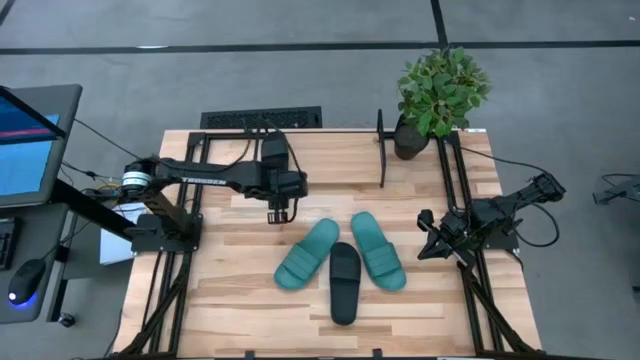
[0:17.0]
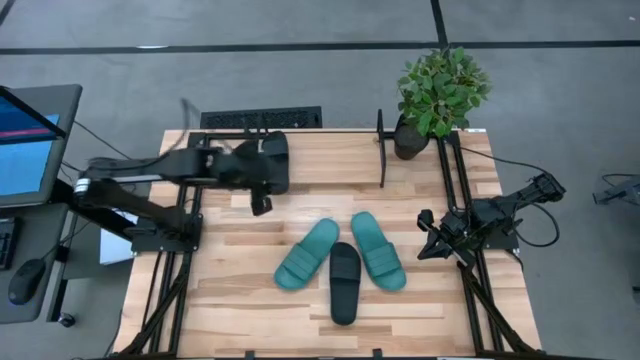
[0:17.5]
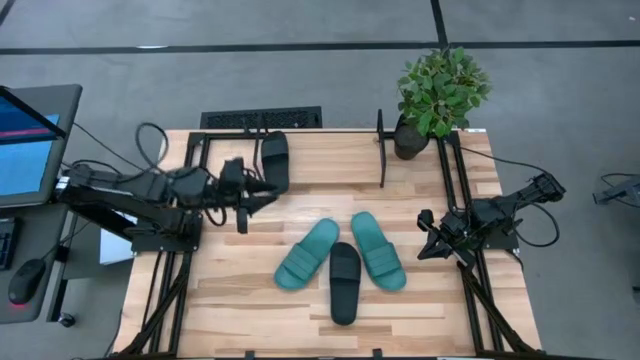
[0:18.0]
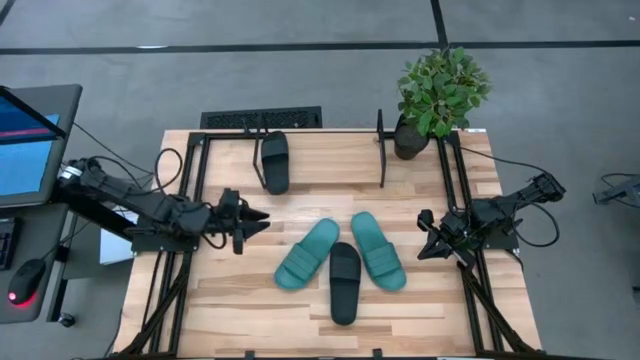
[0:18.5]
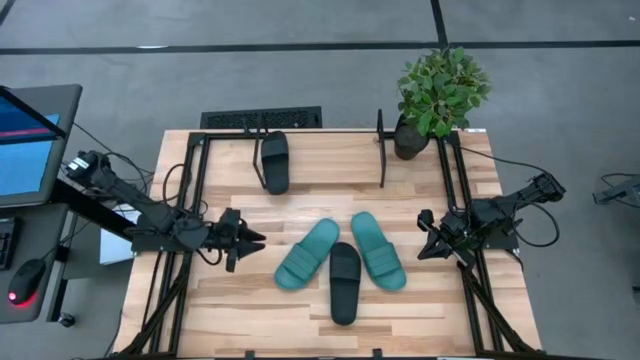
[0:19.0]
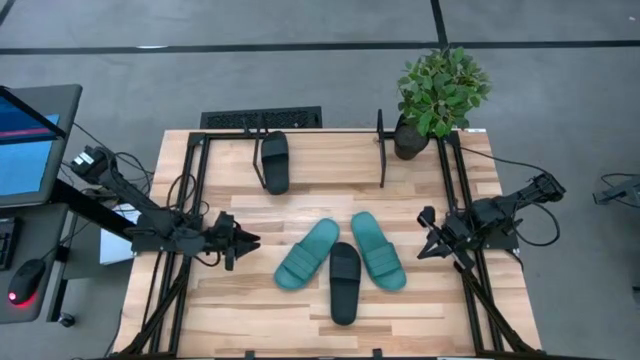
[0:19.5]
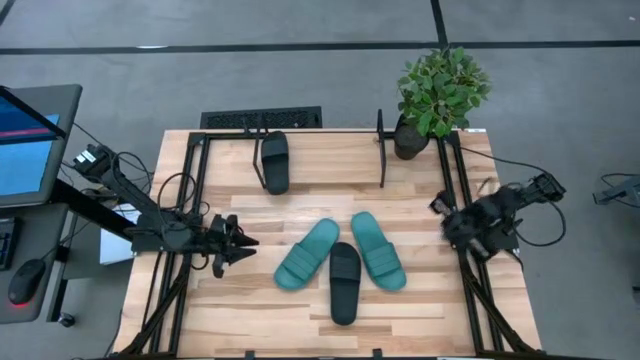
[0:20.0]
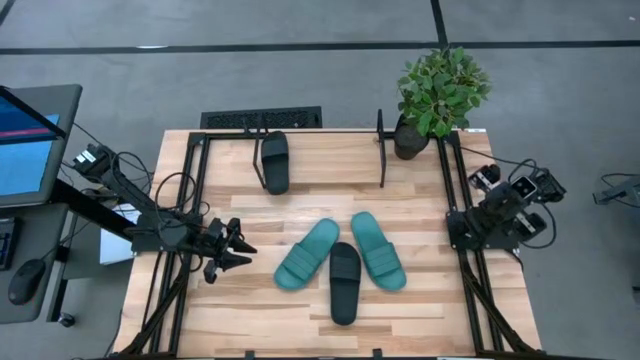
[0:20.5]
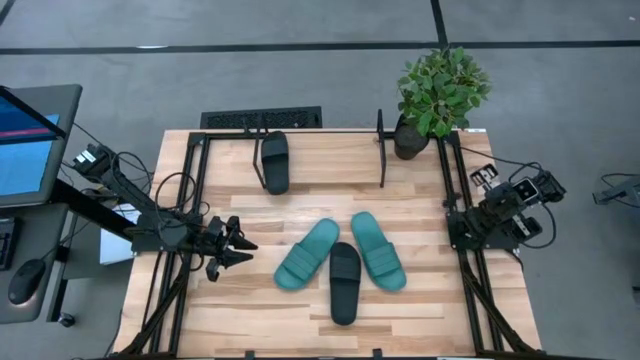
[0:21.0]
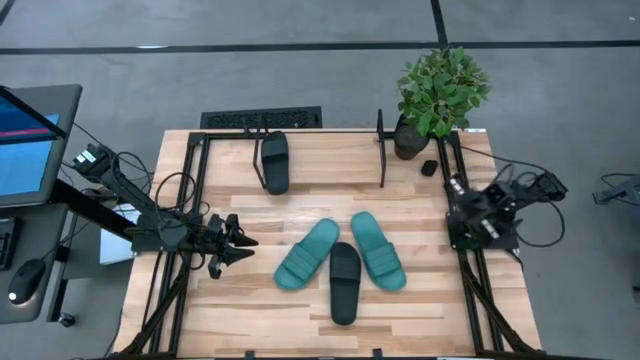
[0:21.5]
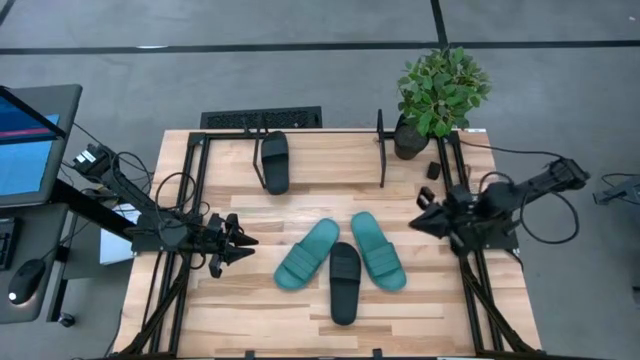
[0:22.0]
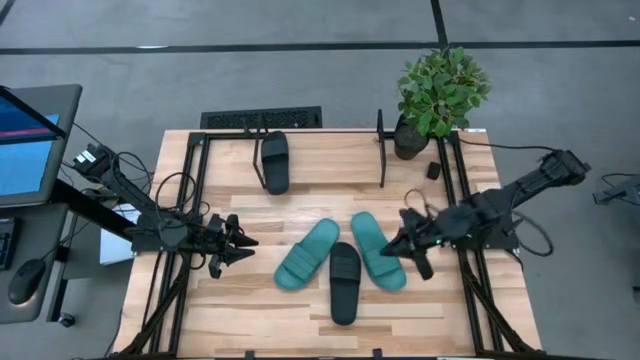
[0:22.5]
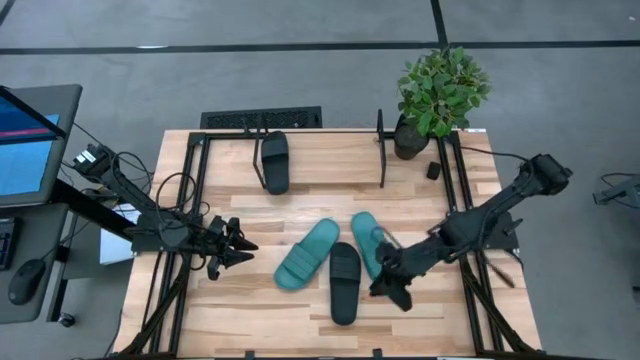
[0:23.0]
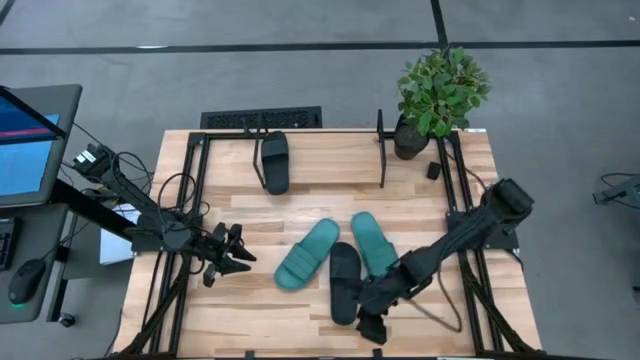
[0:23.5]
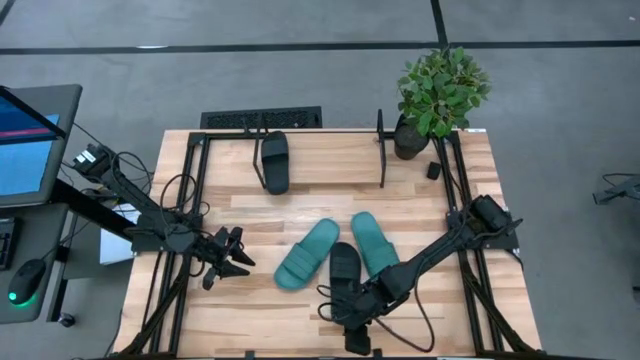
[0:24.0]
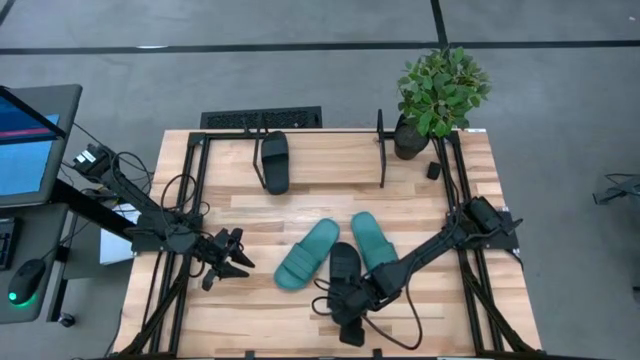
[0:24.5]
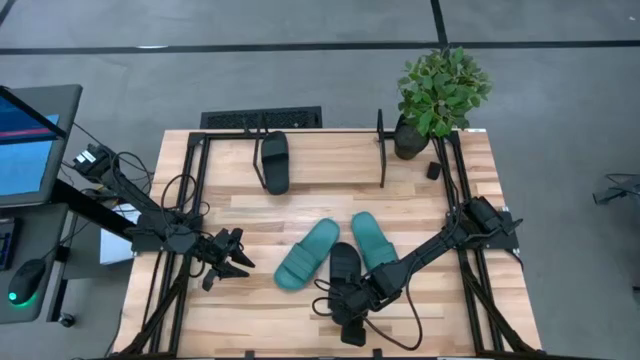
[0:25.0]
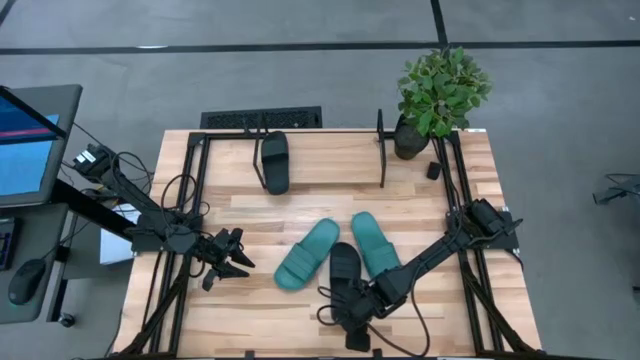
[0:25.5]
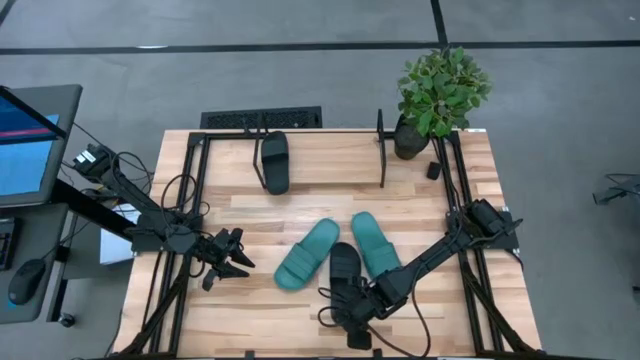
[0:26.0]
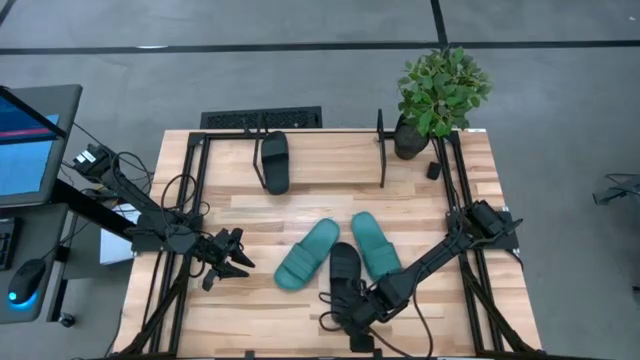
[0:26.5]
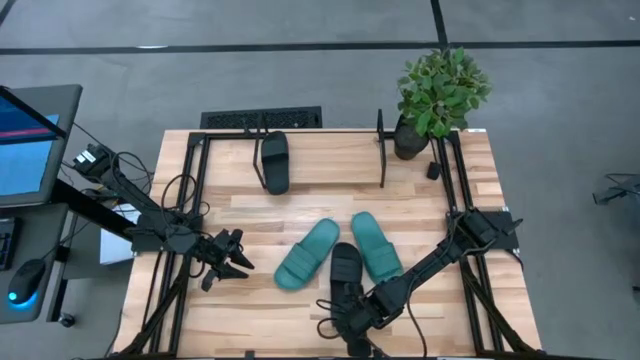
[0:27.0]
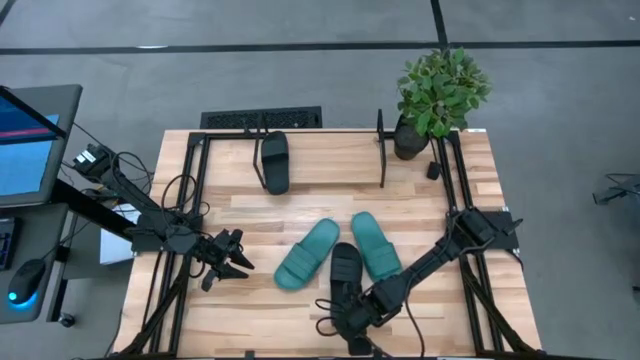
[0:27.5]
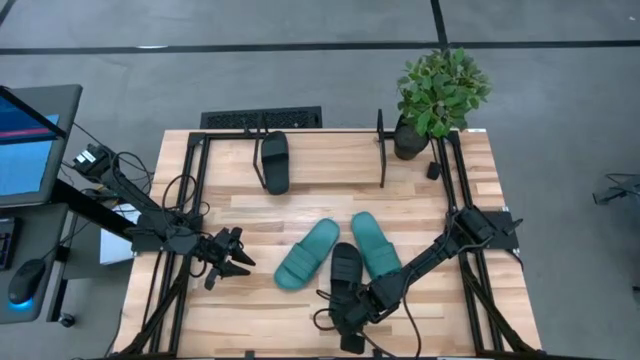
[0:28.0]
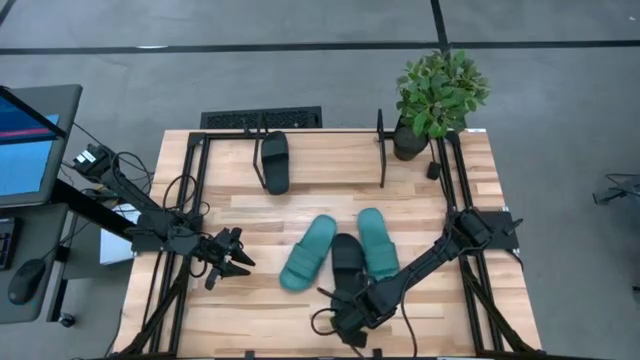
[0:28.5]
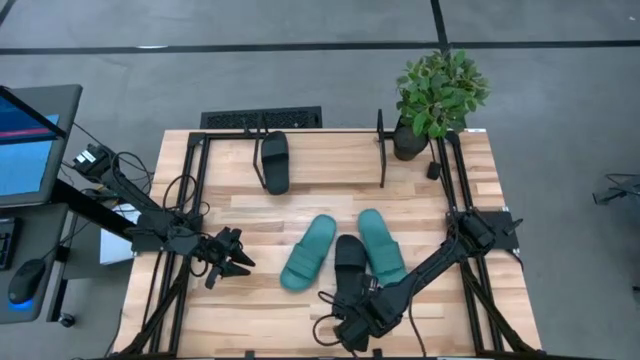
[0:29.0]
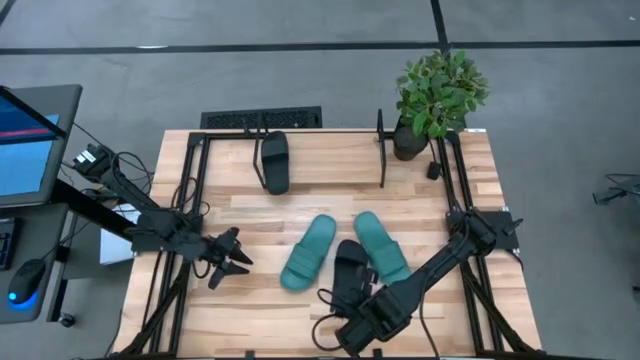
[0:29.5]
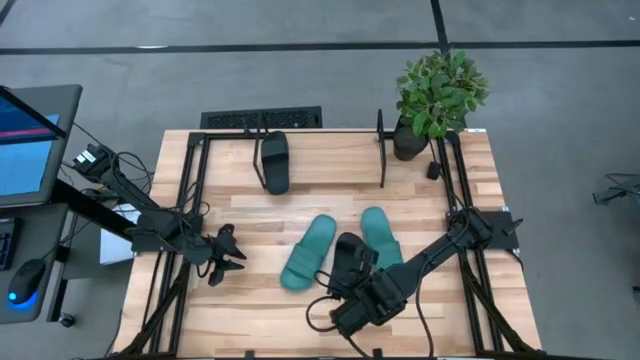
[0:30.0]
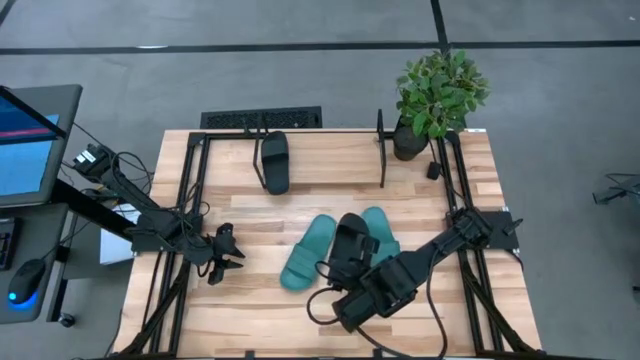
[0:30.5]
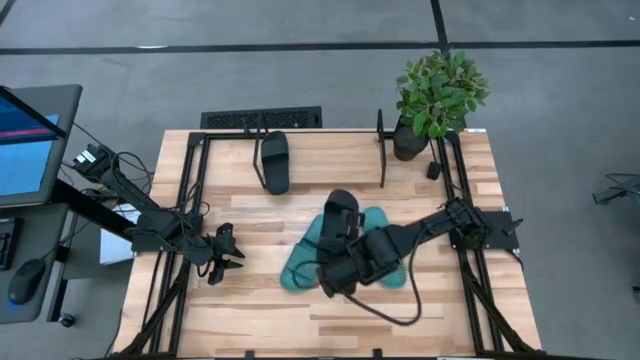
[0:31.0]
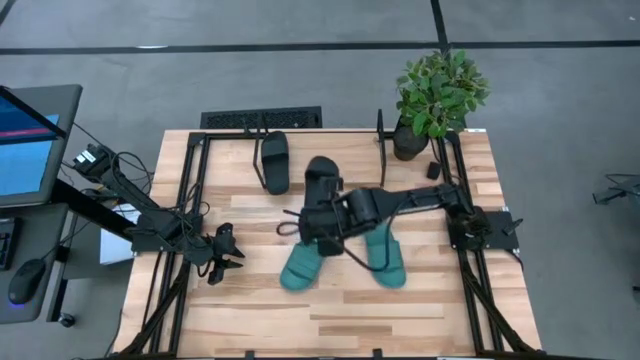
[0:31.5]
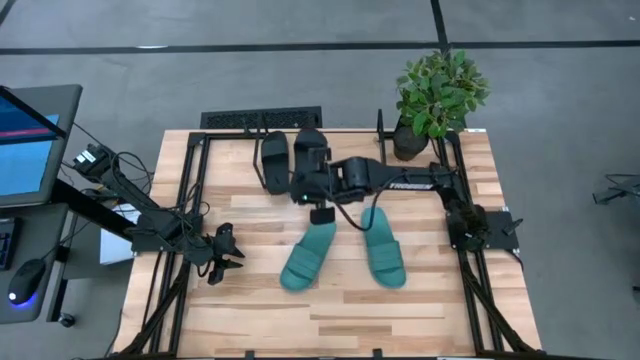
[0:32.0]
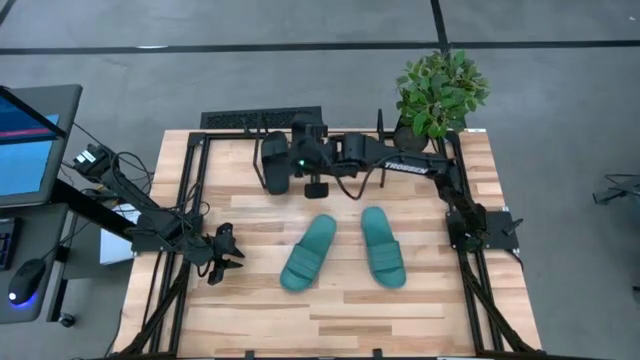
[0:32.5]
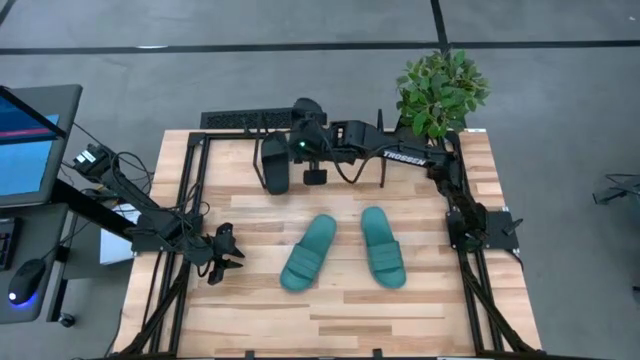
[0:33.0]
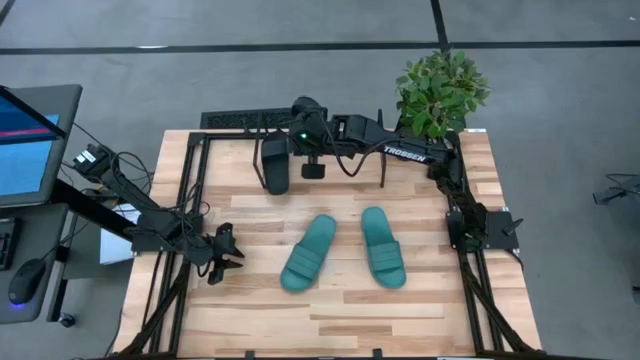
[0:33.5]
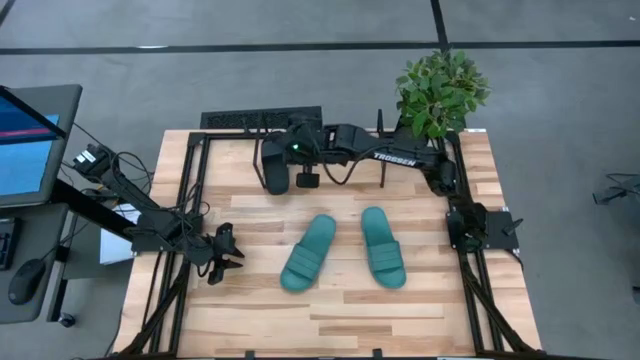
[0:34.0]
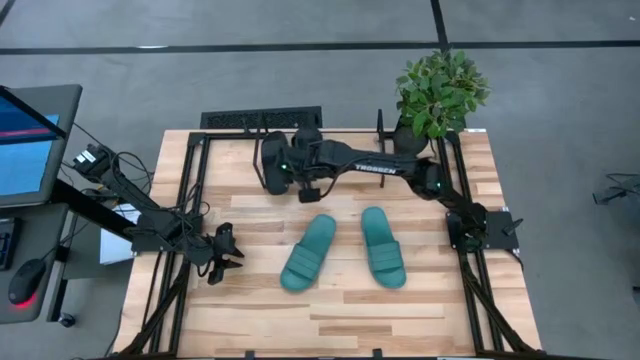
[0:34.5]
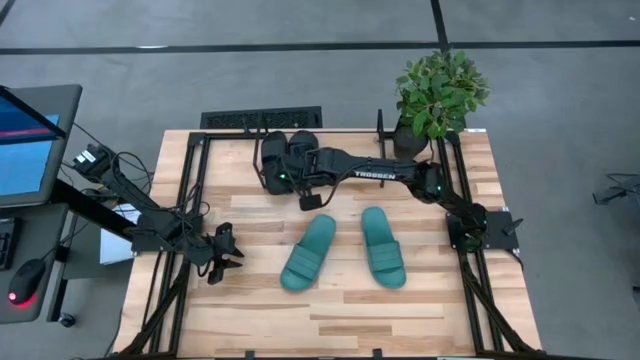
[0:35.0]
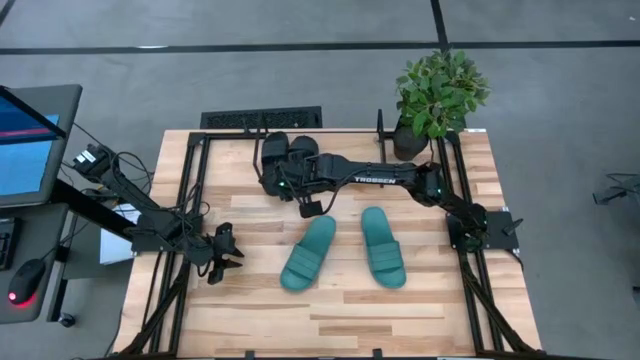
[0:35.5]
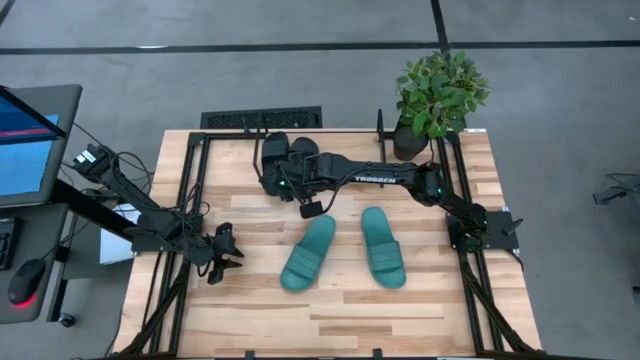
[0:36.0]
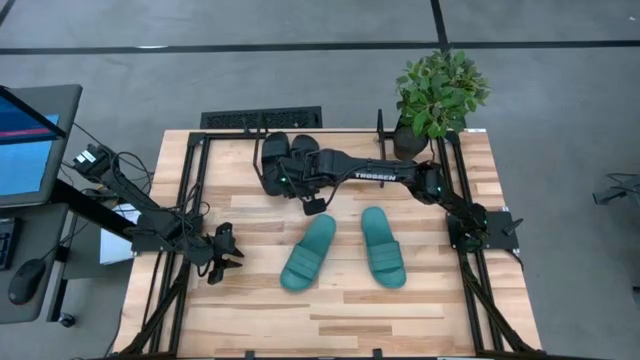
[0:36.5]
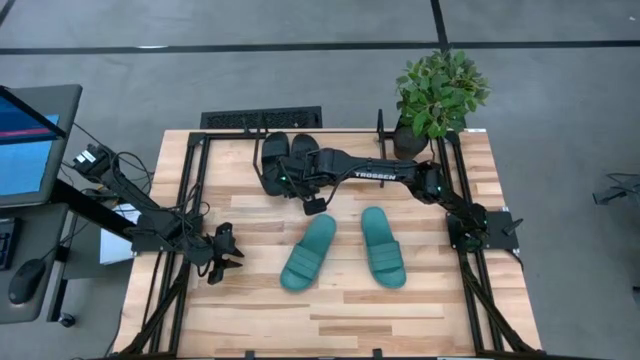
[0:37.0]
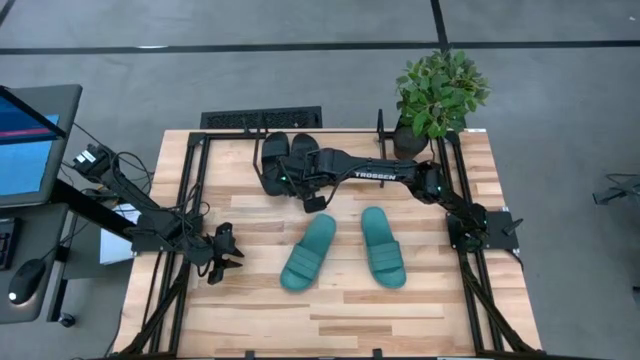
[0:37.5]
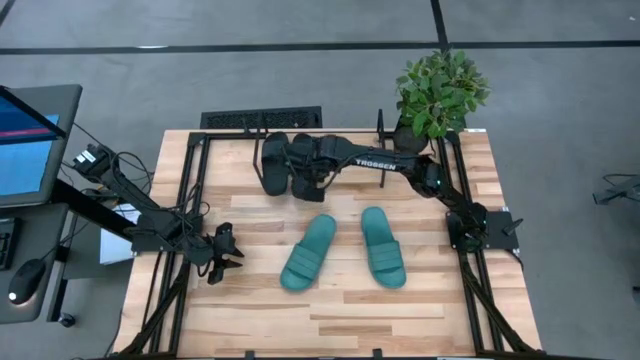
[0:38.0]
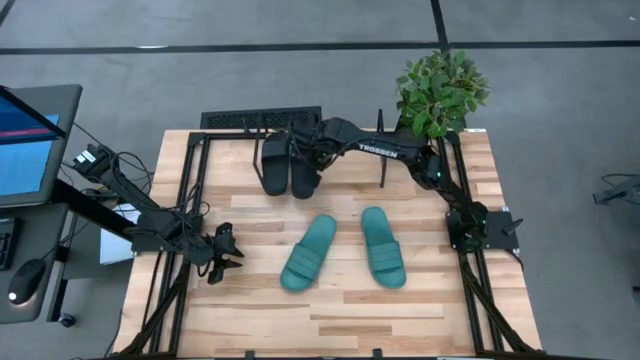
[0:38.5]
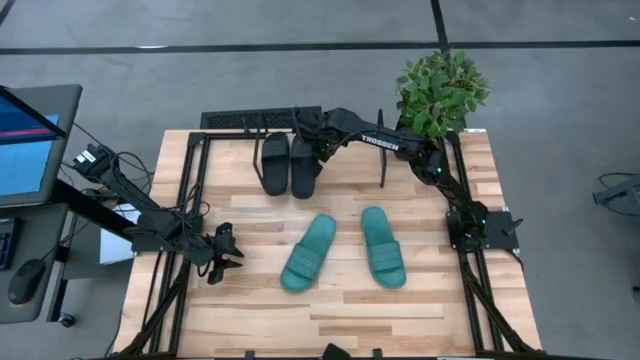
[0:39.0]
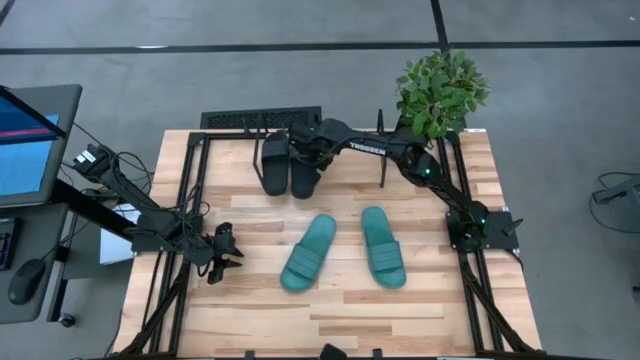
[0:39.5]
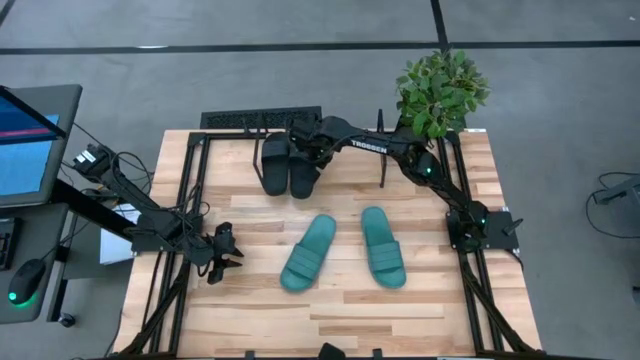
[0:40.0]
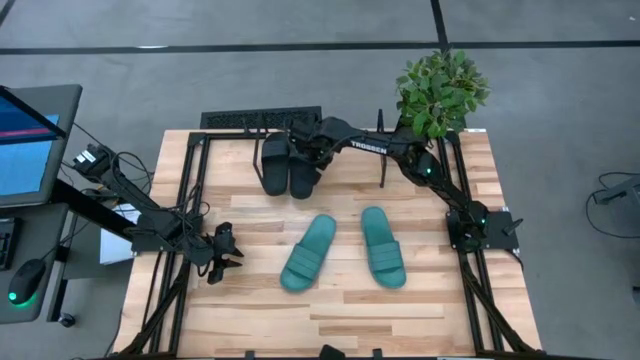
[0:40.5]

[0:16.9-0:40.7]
Task: Pick and place slides into the shelf
Put the black slide on the shelf
